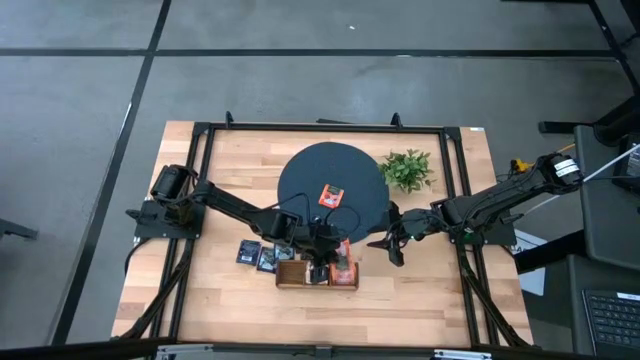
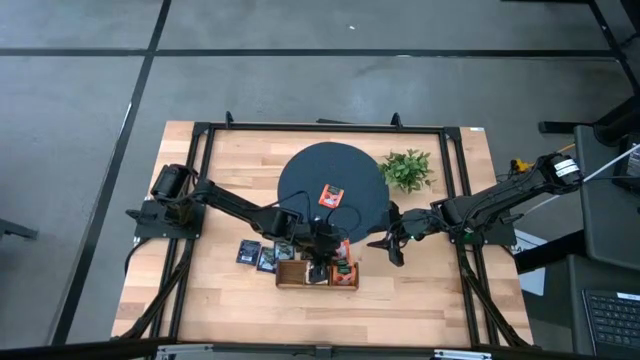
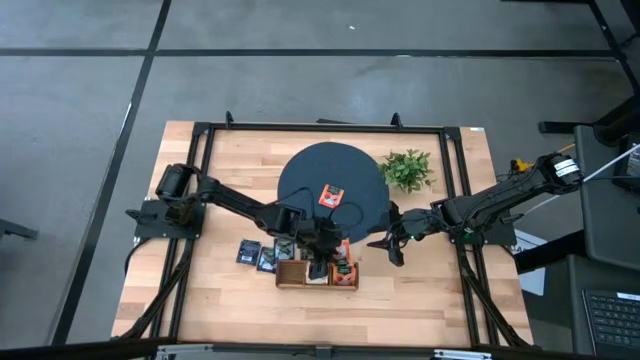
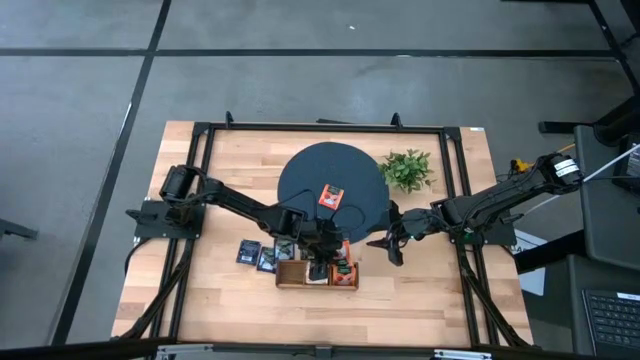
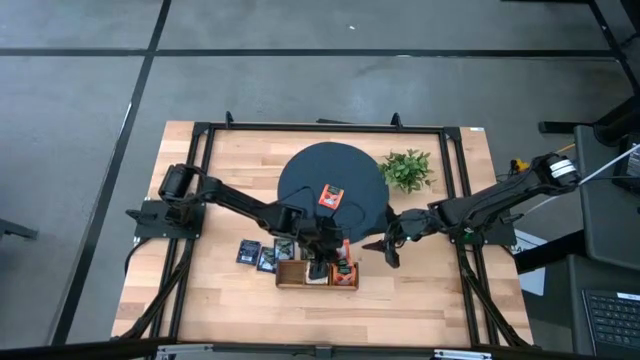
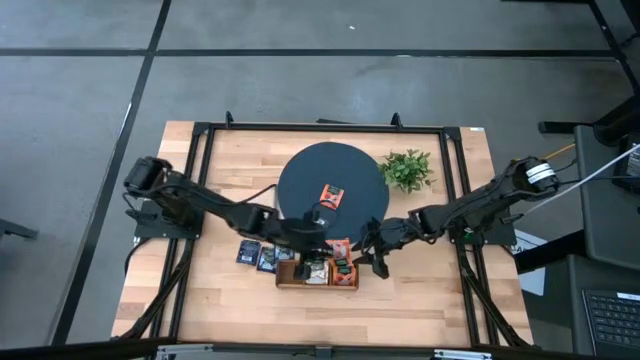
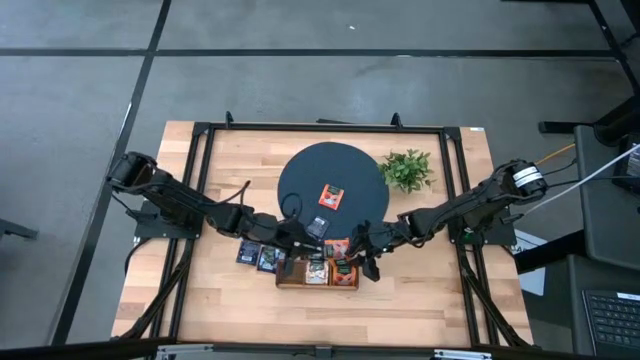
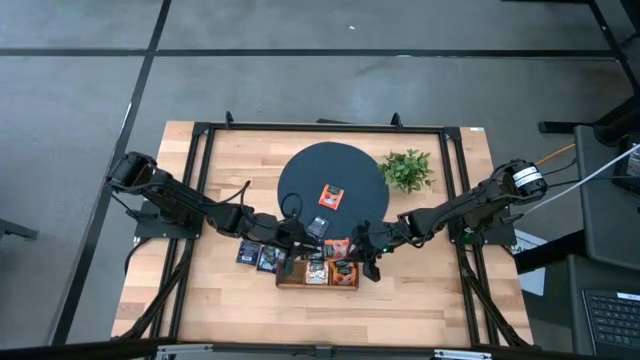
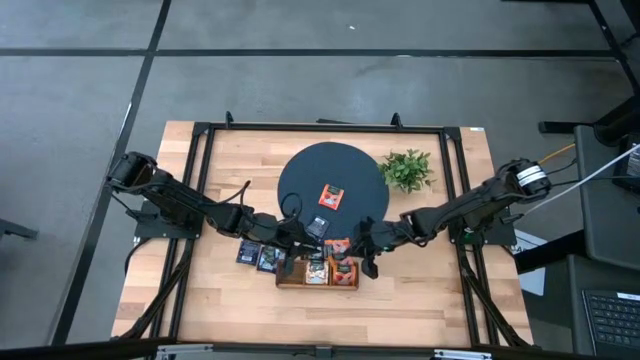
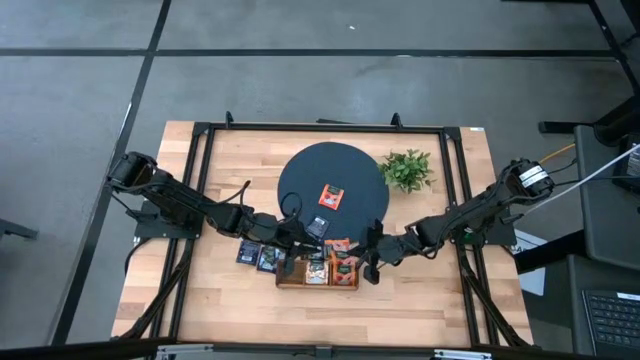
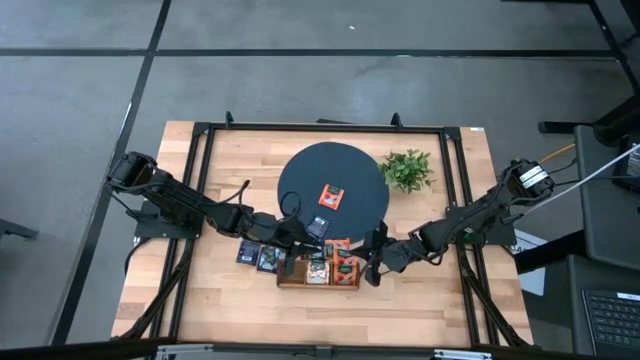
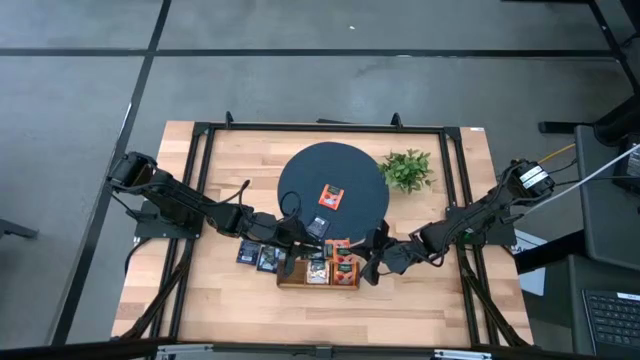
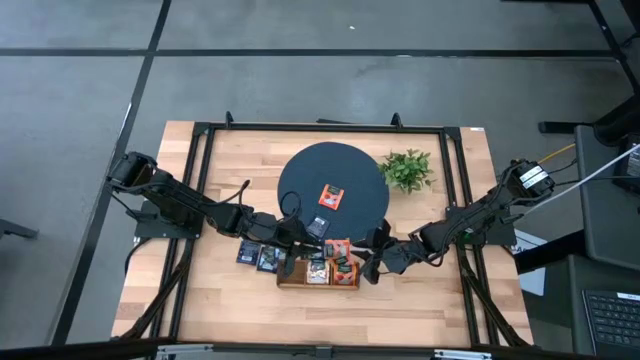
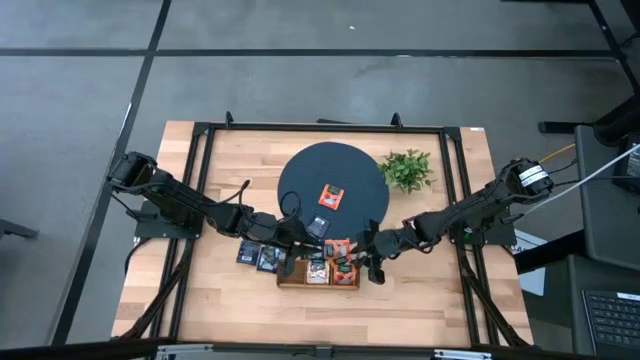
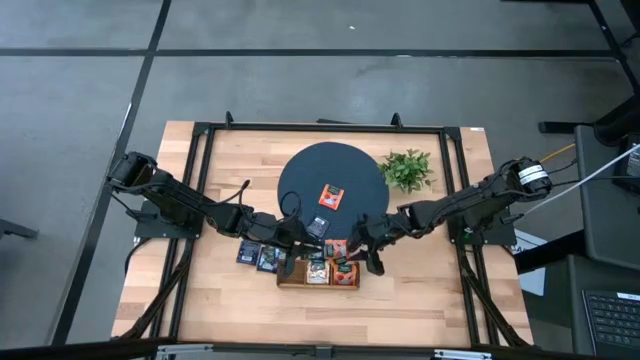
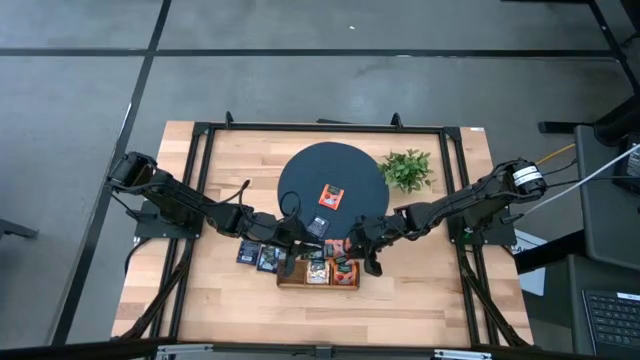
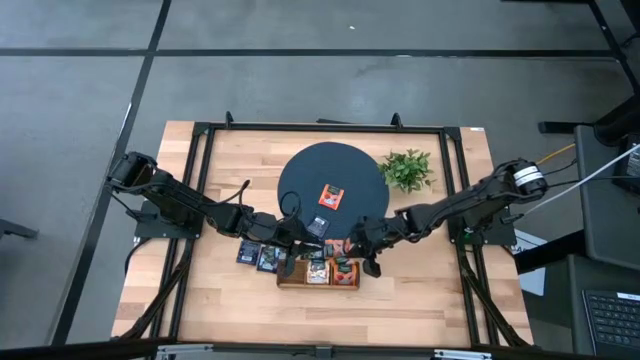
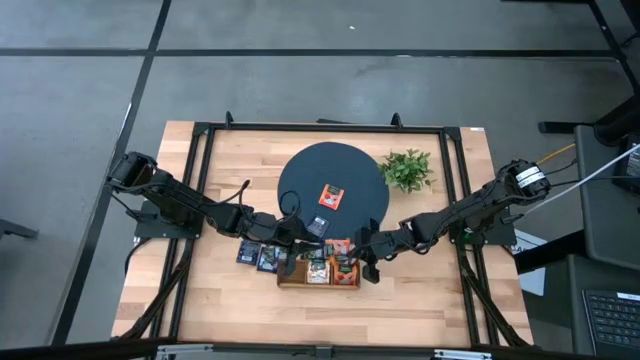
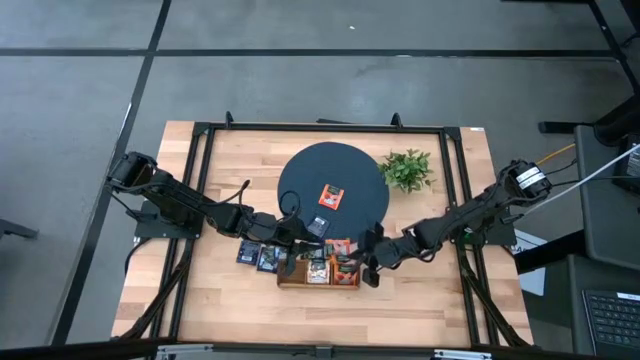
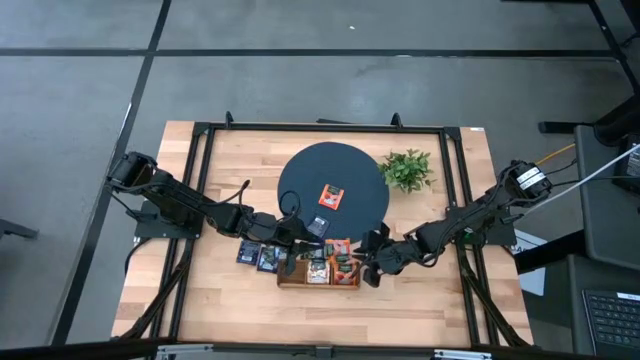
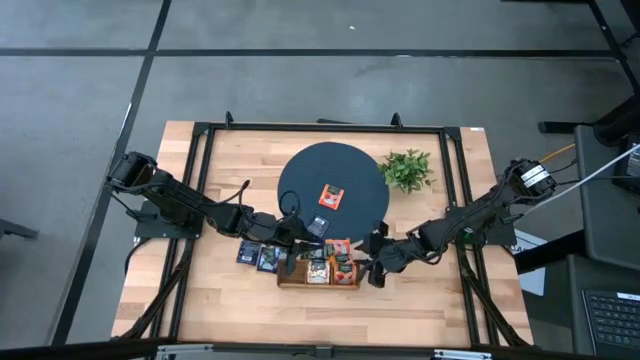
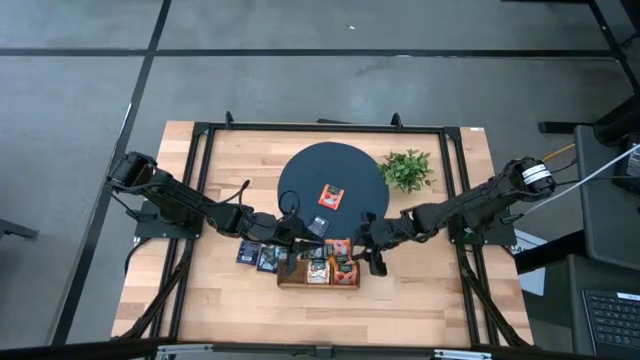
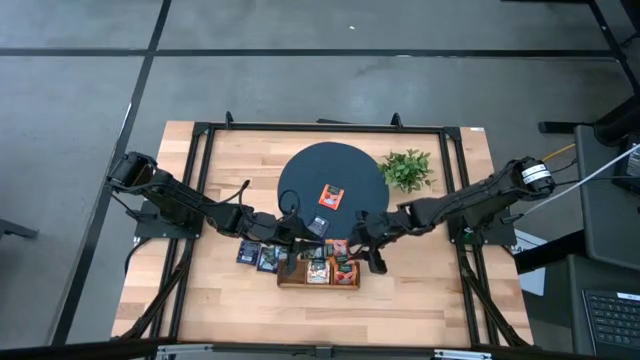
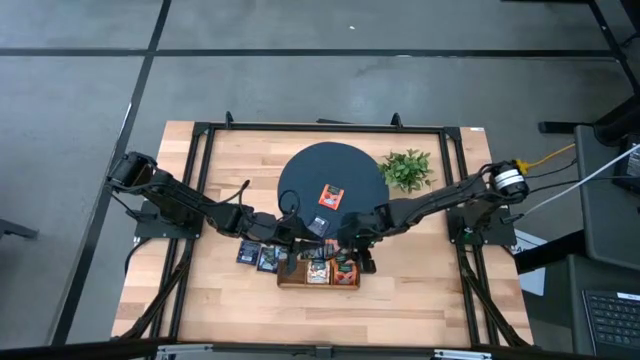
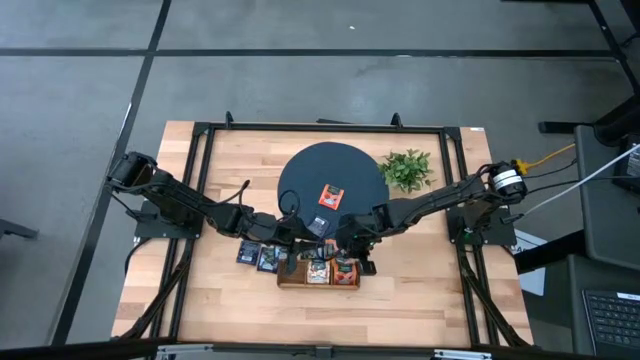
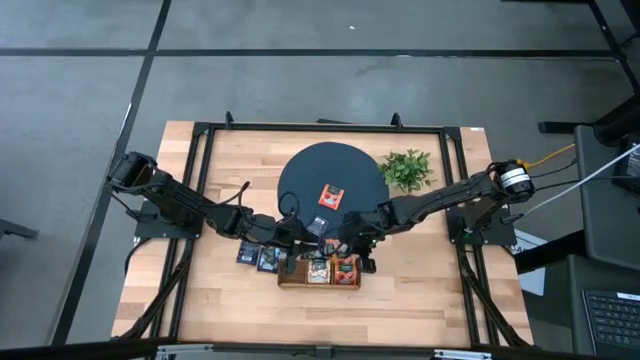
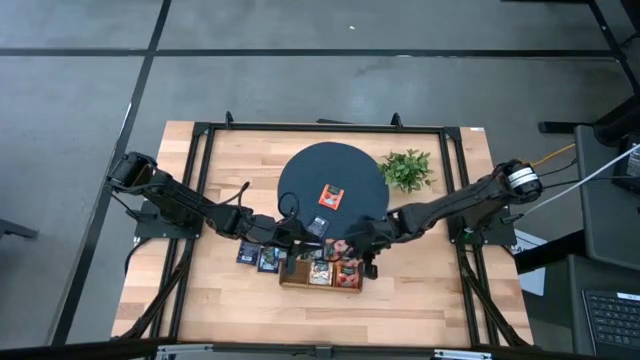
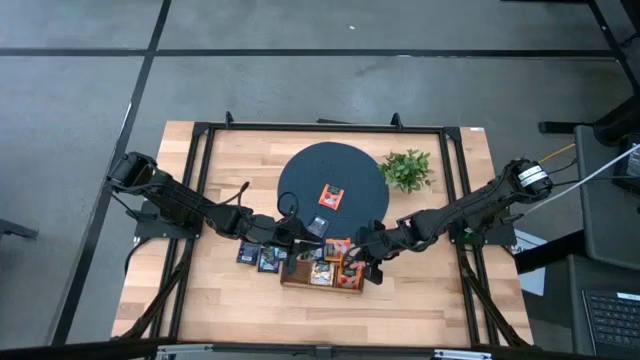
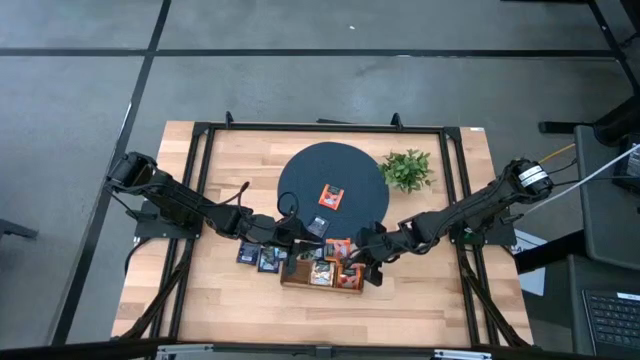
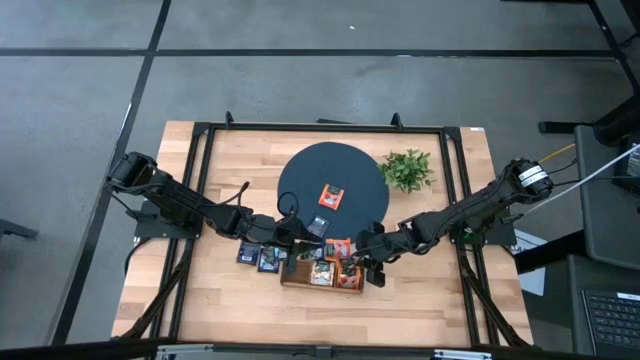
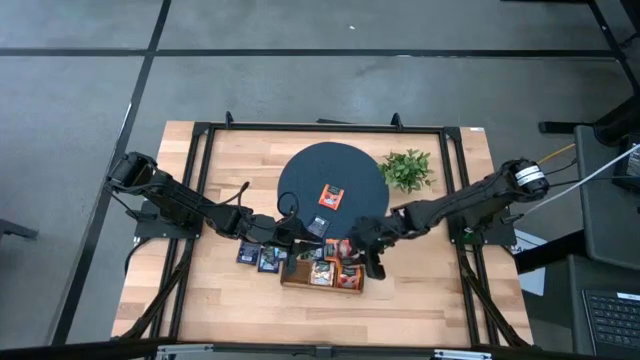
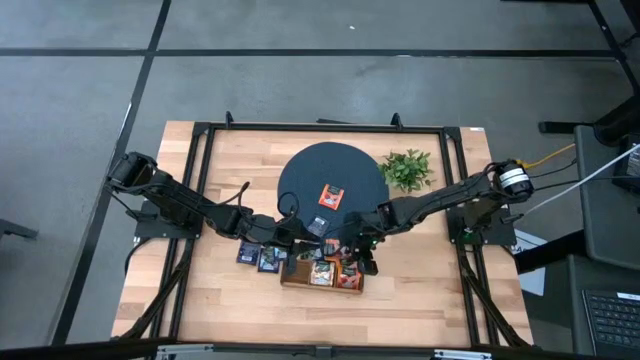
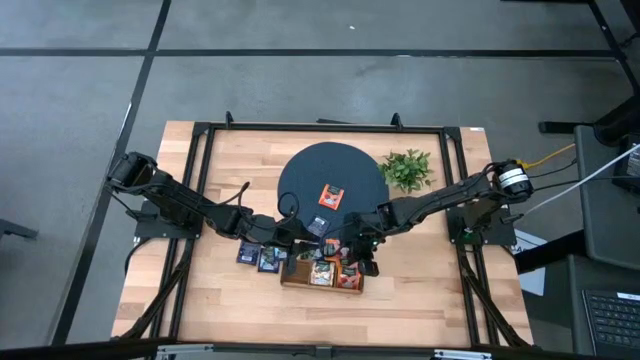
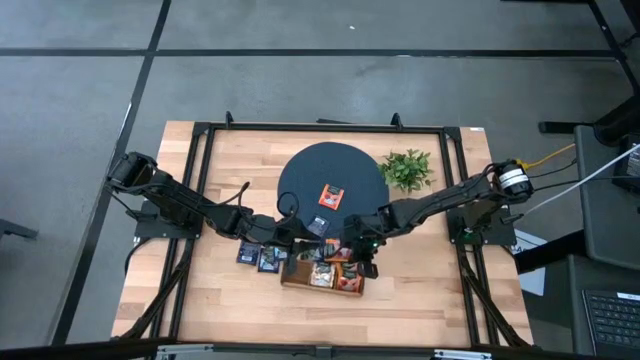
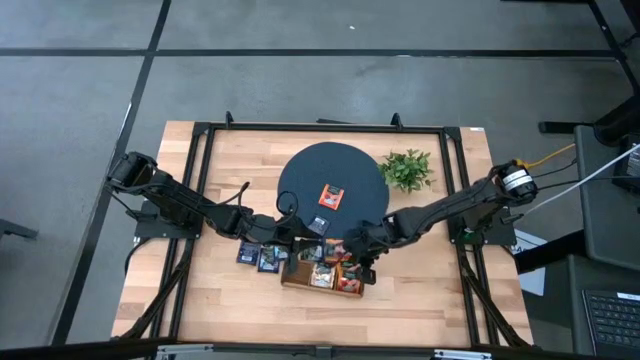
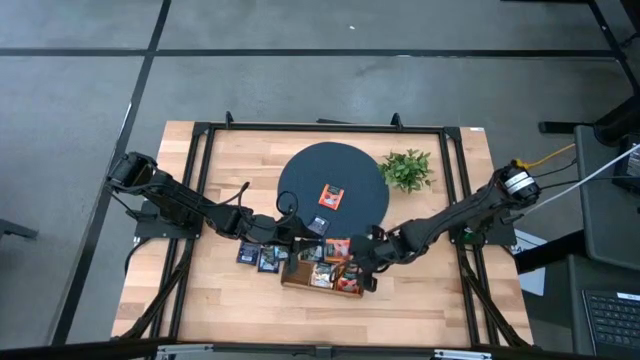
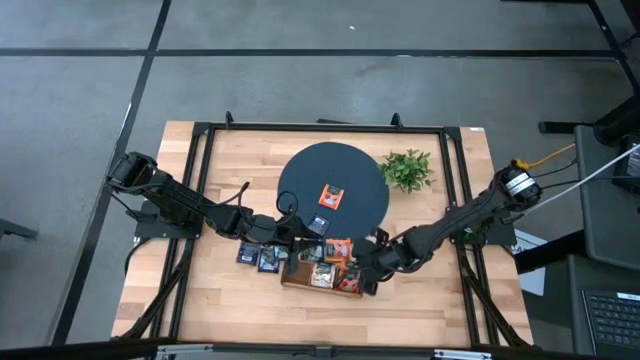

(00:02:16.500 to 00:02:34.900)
Task: Pick & Place Tea
Adjust the orange tea bag in the right section of the wooden organizer

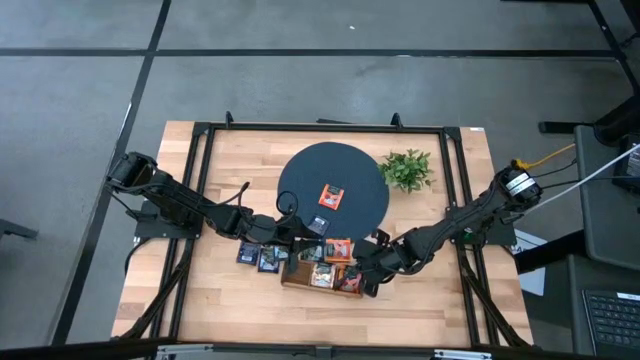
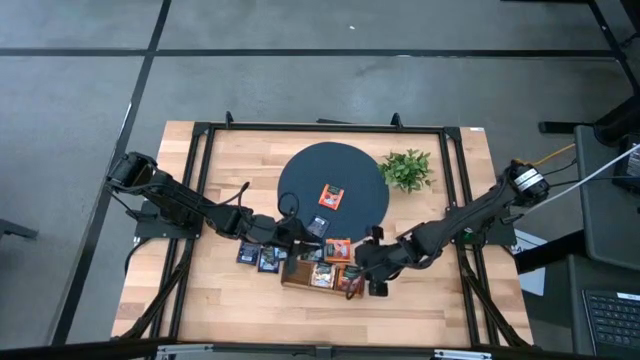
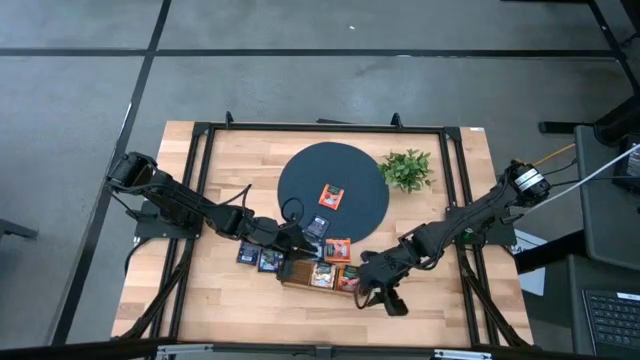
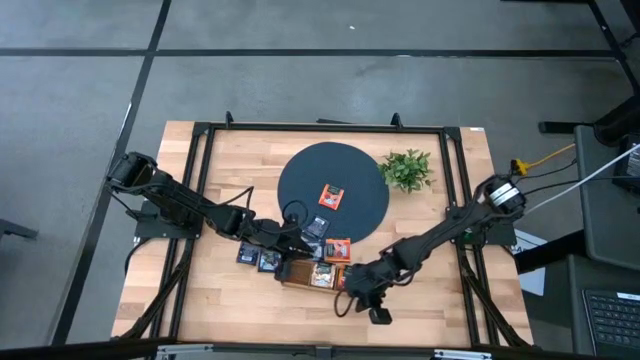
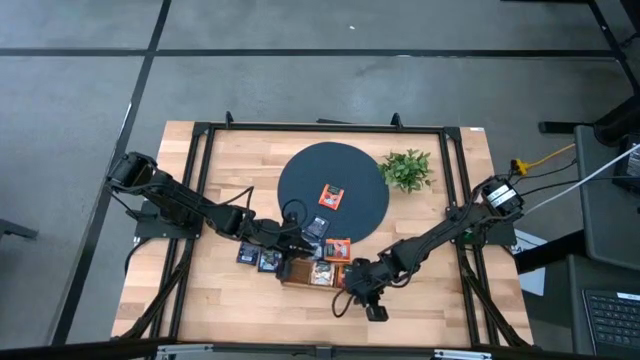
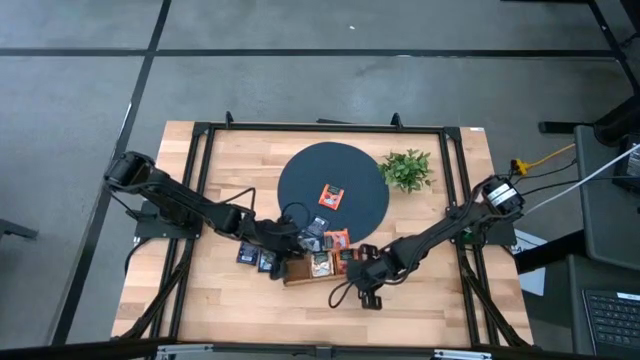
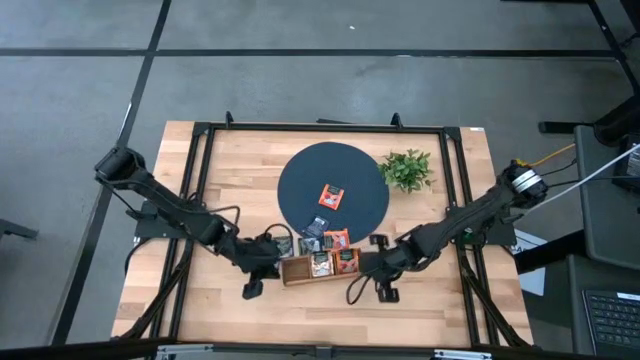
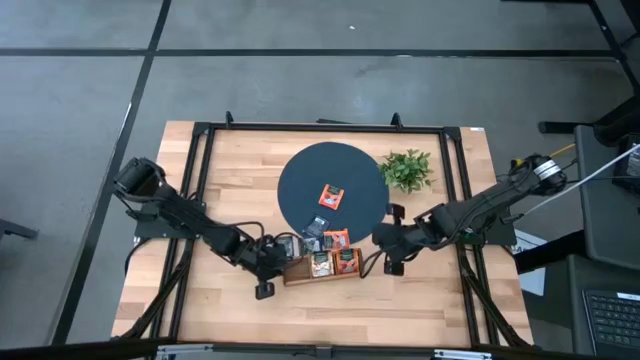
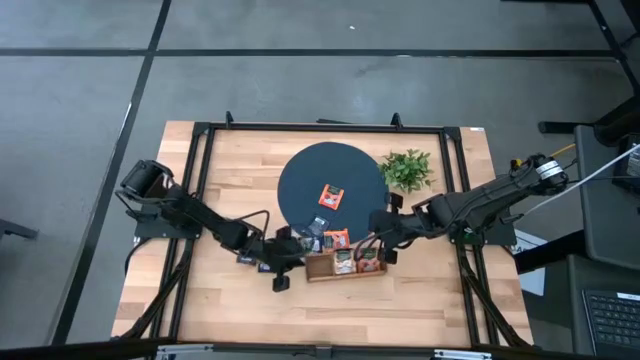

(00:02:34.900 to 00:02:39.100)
Adjust the wooden organizer
